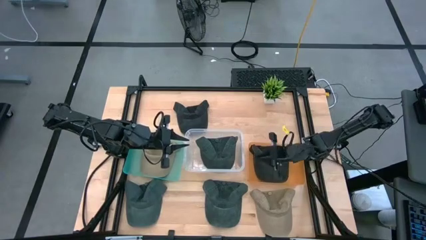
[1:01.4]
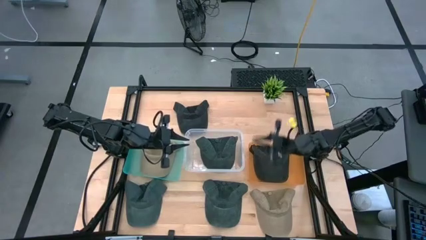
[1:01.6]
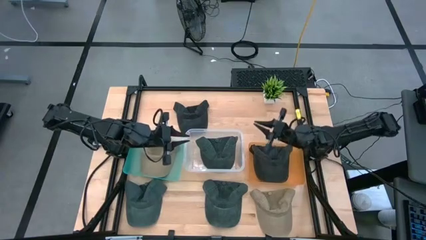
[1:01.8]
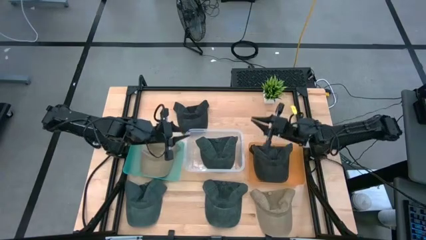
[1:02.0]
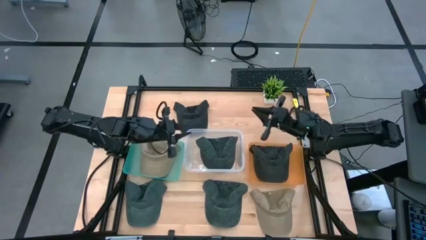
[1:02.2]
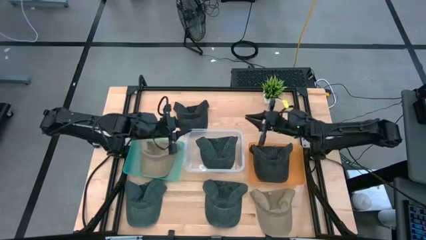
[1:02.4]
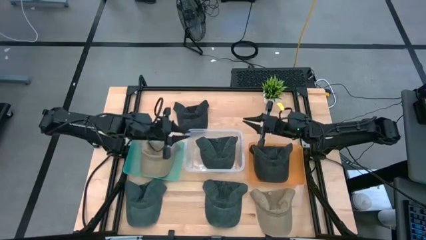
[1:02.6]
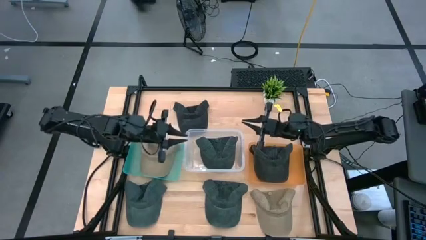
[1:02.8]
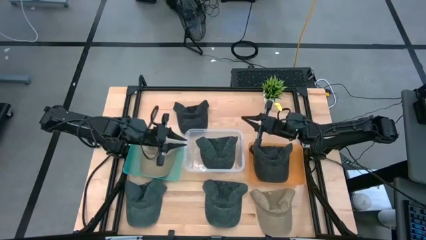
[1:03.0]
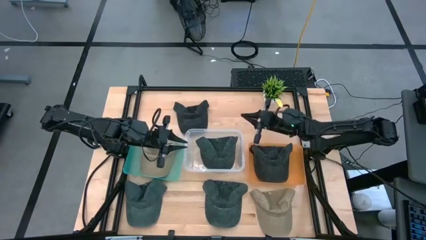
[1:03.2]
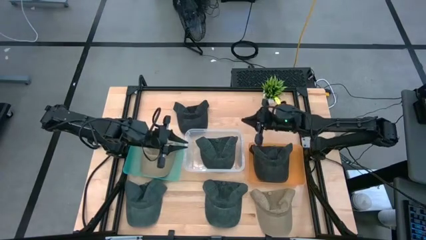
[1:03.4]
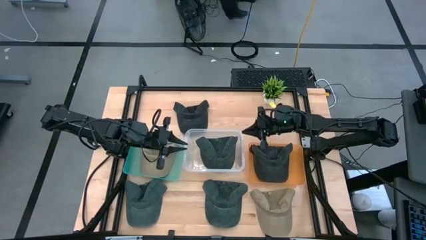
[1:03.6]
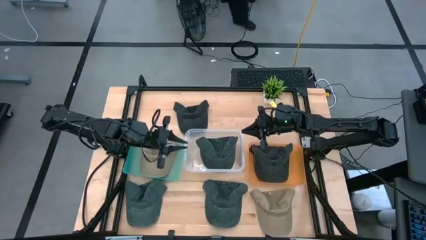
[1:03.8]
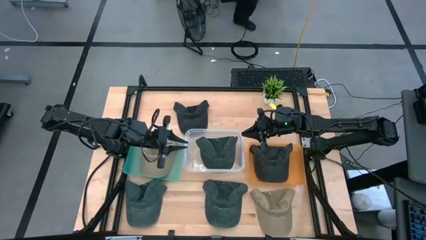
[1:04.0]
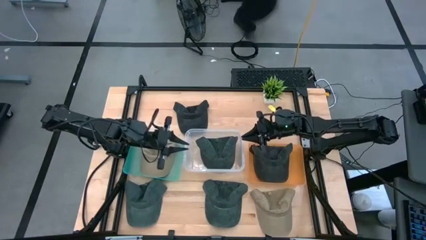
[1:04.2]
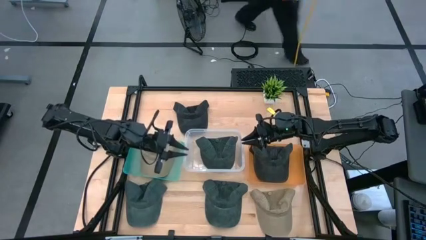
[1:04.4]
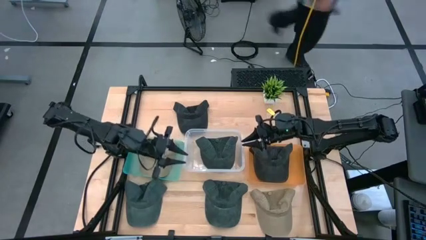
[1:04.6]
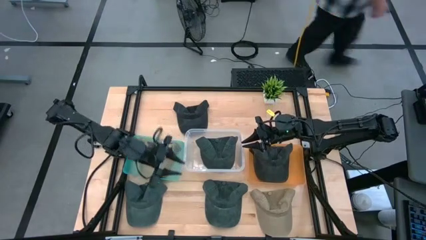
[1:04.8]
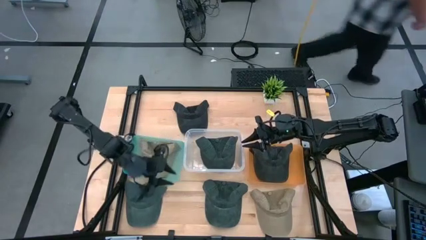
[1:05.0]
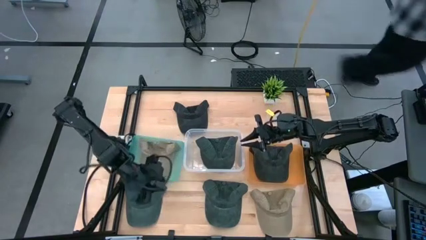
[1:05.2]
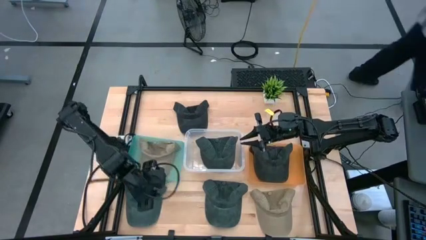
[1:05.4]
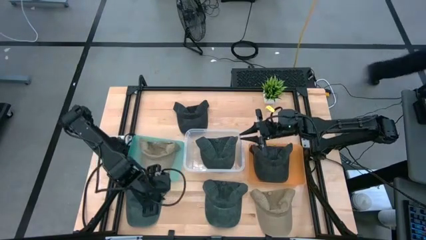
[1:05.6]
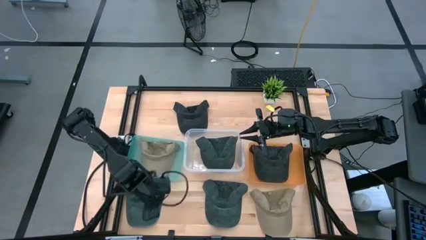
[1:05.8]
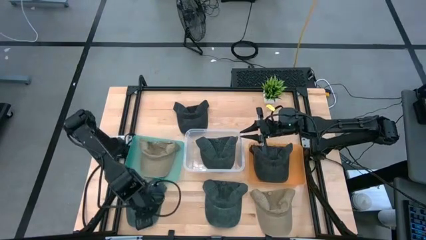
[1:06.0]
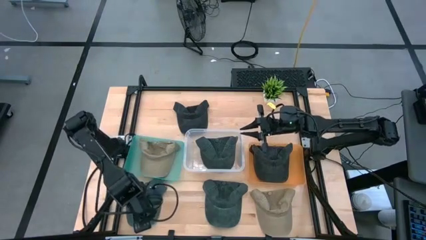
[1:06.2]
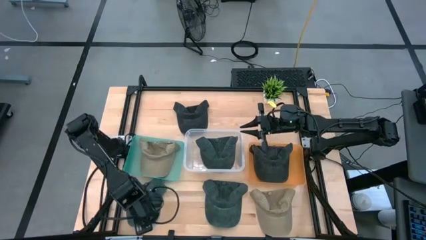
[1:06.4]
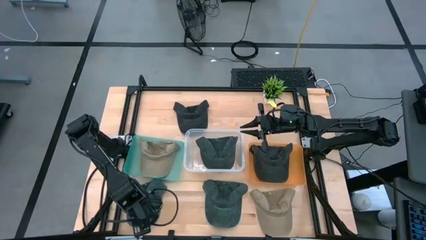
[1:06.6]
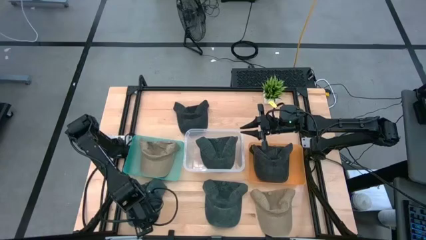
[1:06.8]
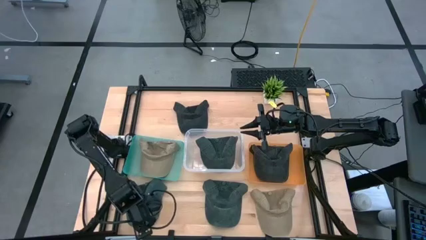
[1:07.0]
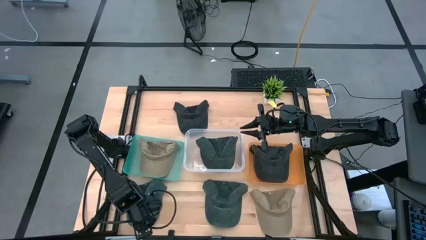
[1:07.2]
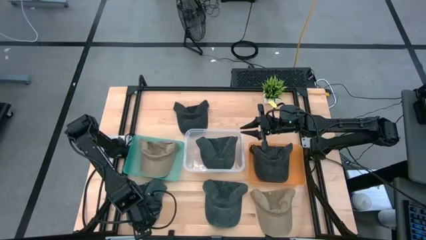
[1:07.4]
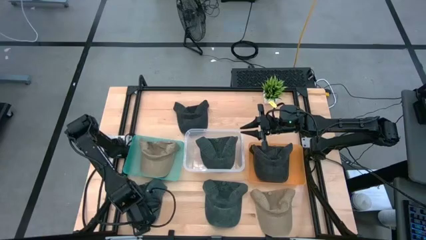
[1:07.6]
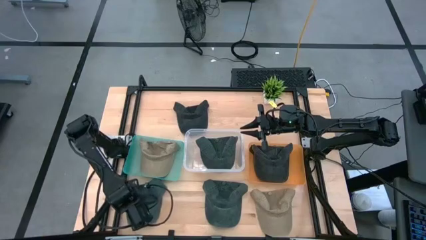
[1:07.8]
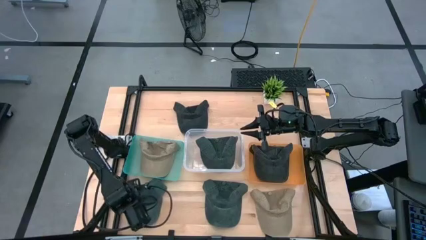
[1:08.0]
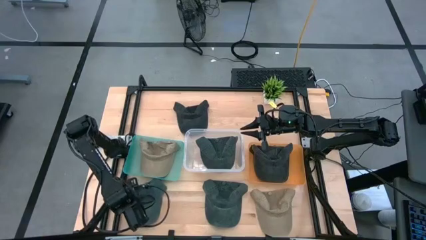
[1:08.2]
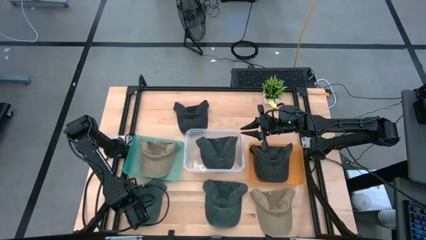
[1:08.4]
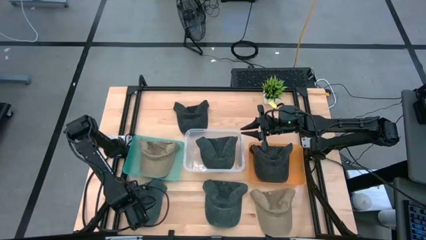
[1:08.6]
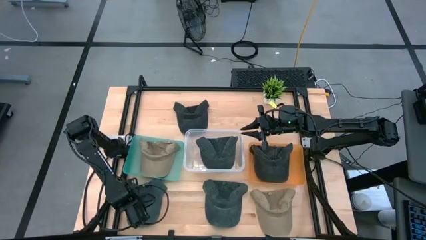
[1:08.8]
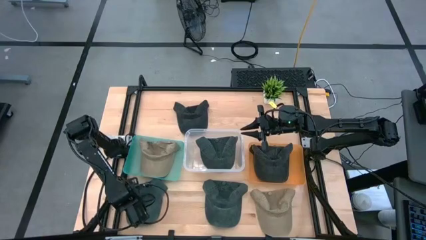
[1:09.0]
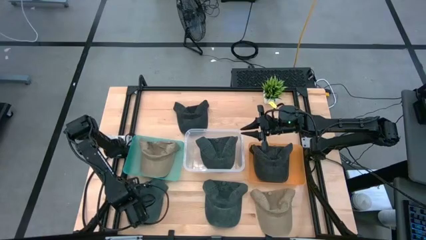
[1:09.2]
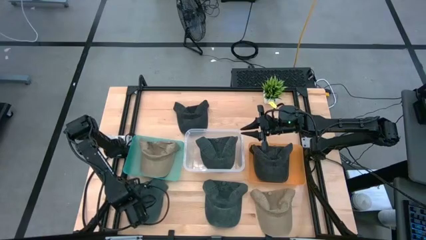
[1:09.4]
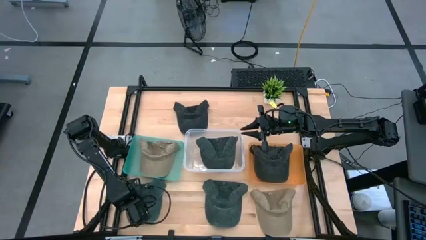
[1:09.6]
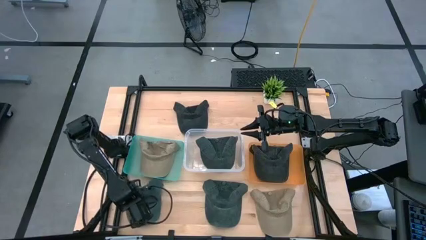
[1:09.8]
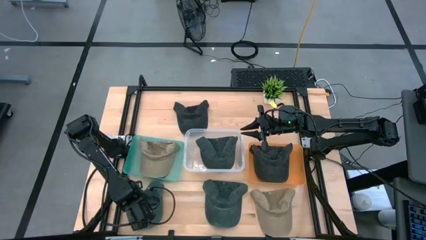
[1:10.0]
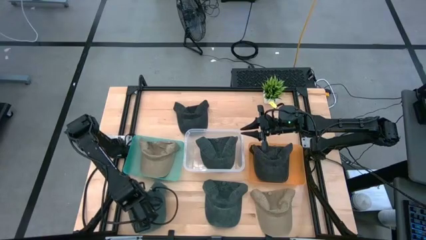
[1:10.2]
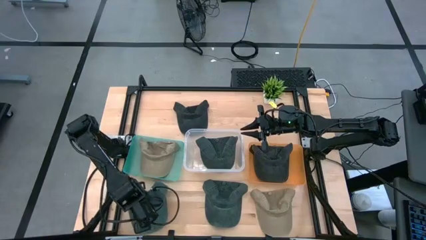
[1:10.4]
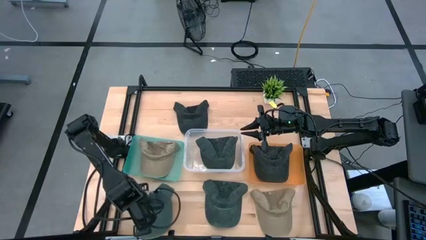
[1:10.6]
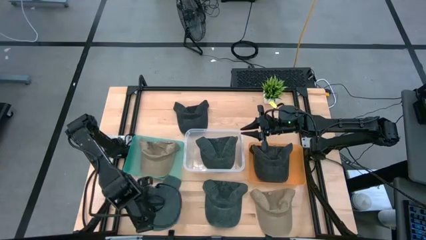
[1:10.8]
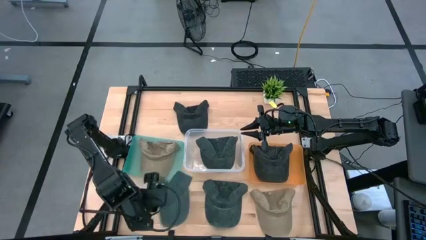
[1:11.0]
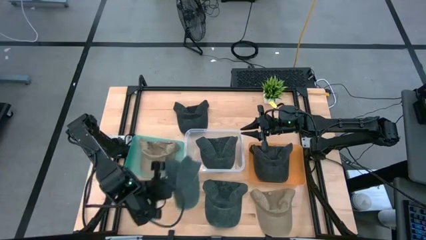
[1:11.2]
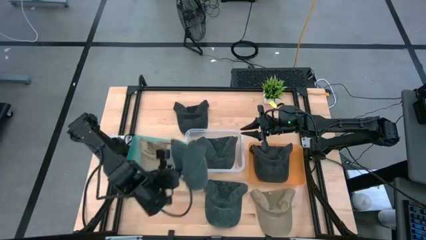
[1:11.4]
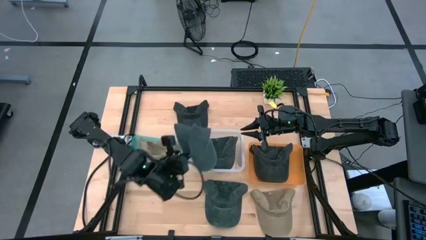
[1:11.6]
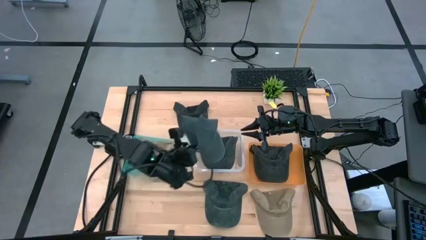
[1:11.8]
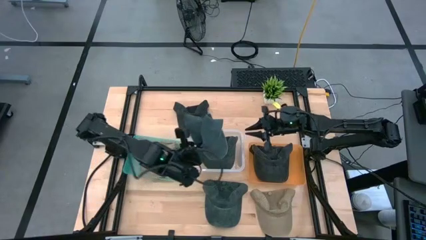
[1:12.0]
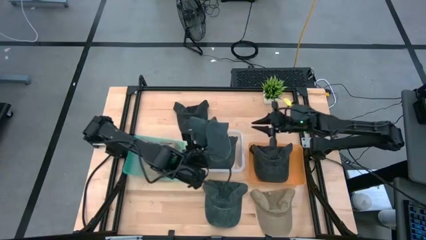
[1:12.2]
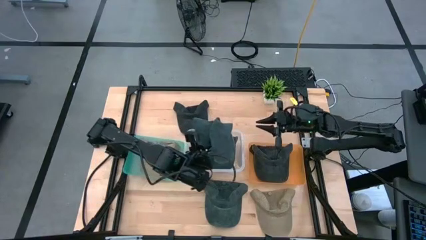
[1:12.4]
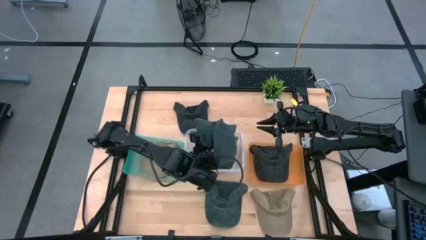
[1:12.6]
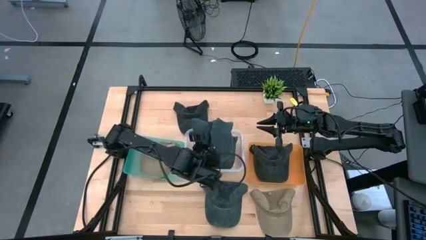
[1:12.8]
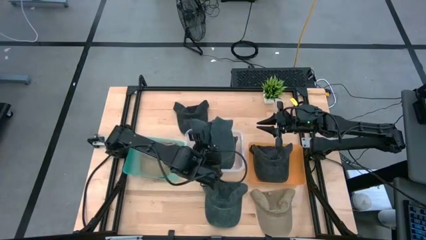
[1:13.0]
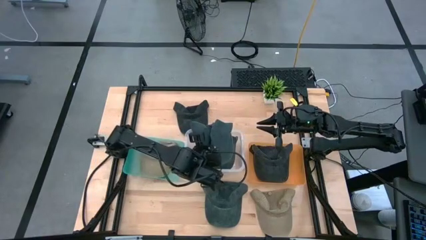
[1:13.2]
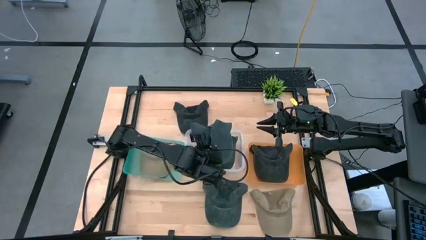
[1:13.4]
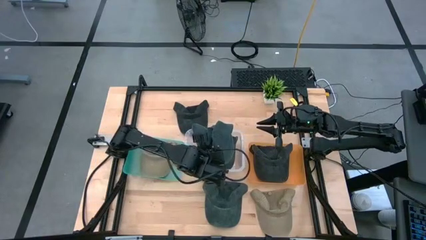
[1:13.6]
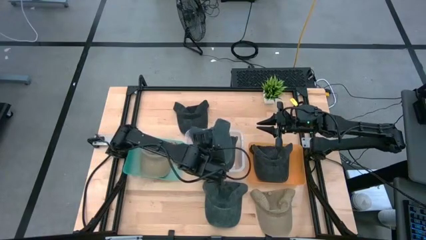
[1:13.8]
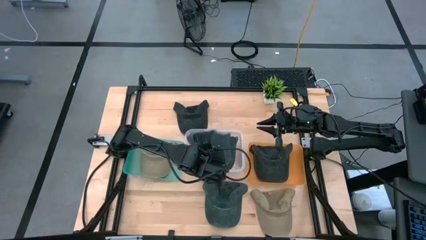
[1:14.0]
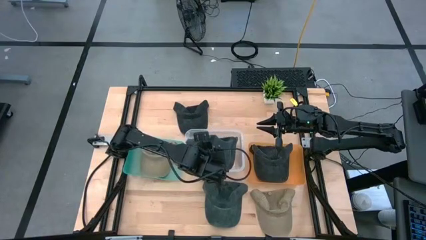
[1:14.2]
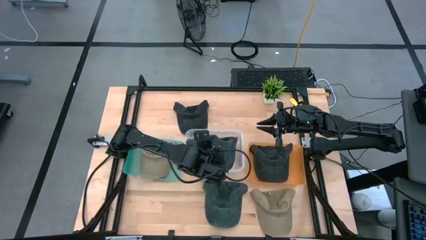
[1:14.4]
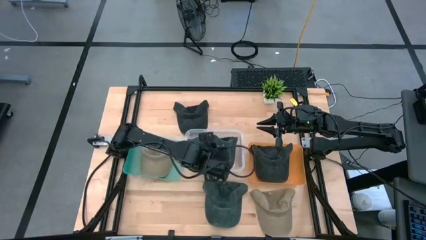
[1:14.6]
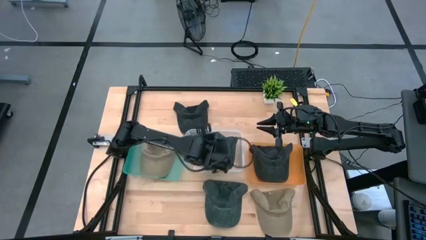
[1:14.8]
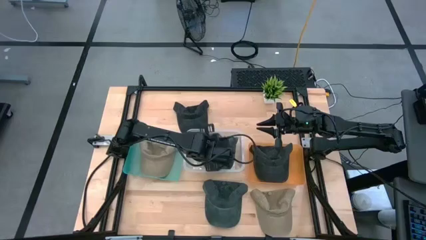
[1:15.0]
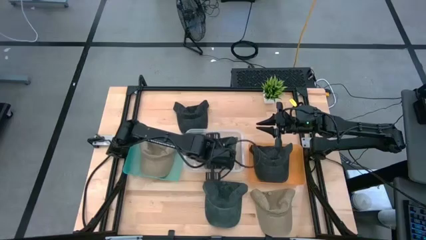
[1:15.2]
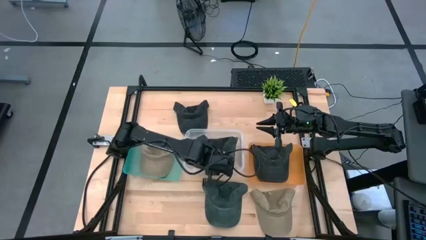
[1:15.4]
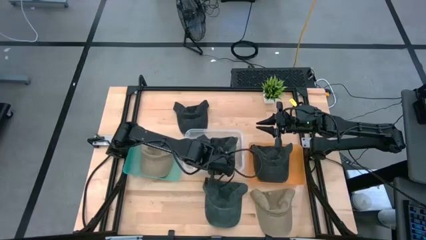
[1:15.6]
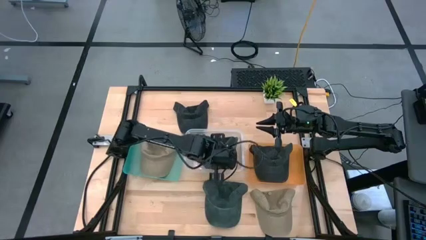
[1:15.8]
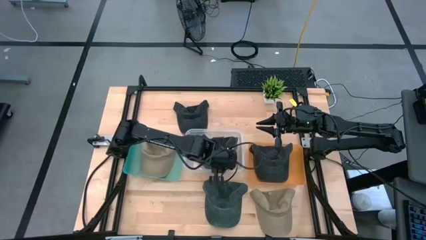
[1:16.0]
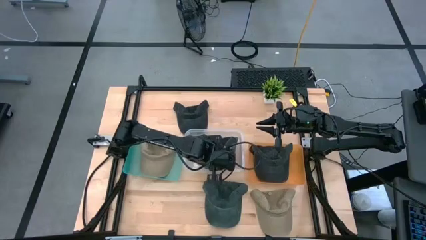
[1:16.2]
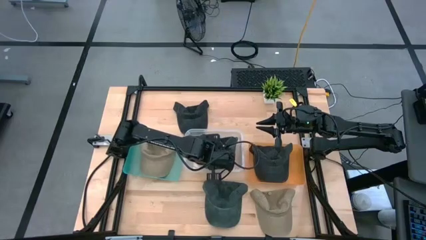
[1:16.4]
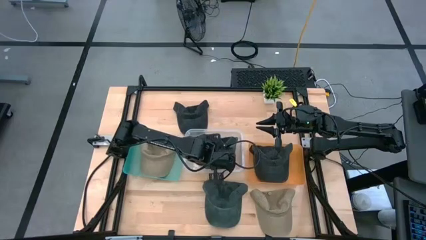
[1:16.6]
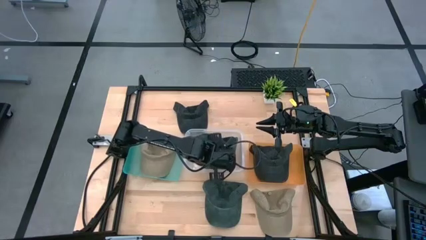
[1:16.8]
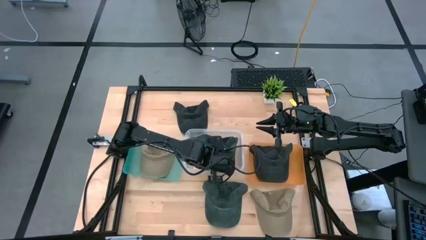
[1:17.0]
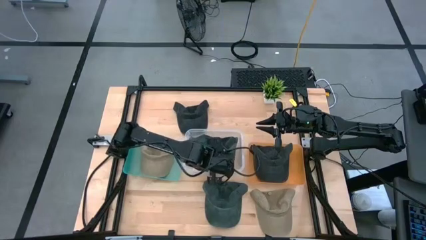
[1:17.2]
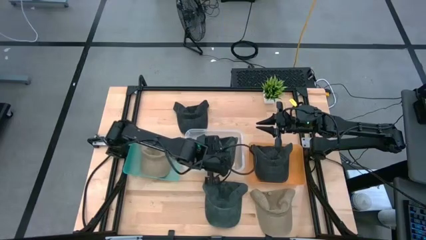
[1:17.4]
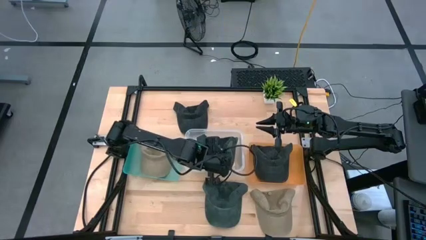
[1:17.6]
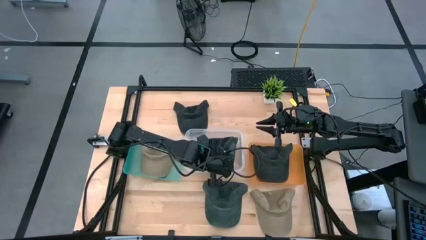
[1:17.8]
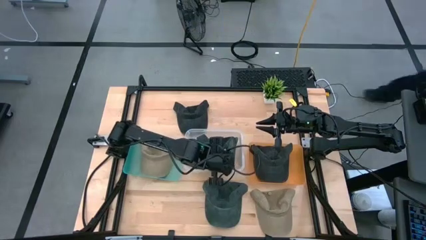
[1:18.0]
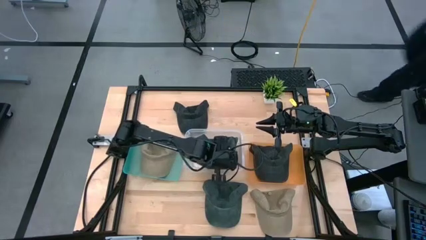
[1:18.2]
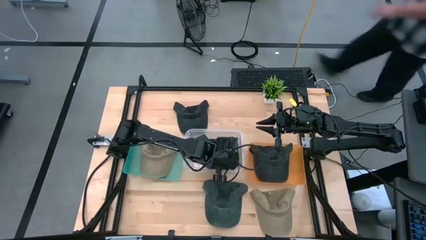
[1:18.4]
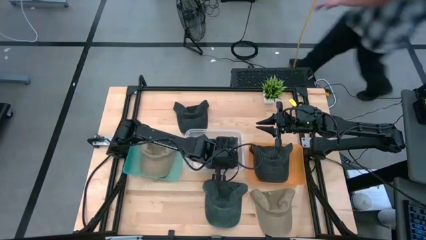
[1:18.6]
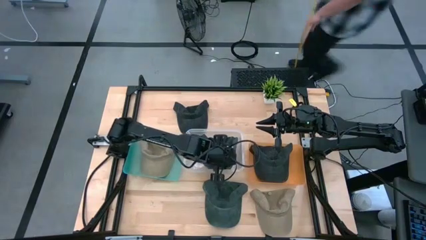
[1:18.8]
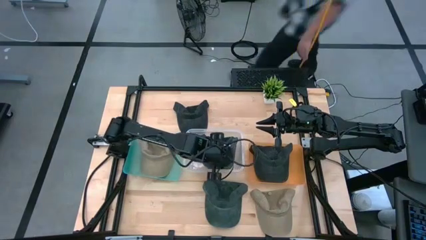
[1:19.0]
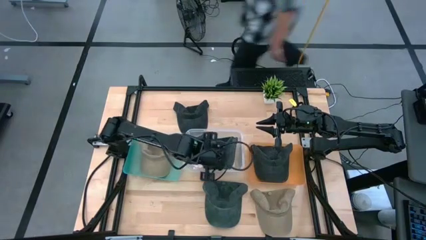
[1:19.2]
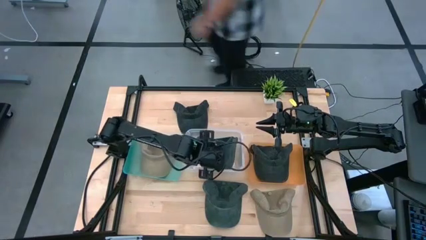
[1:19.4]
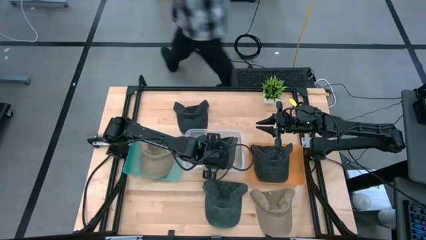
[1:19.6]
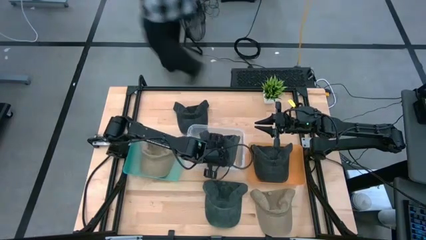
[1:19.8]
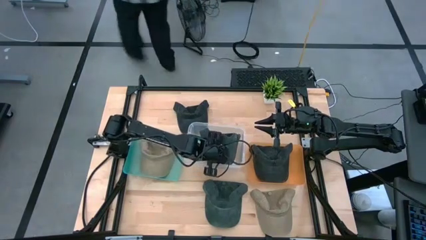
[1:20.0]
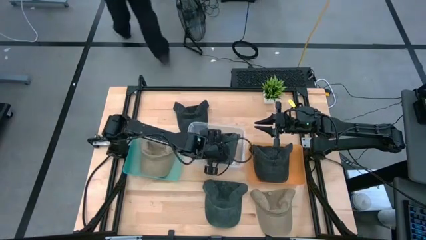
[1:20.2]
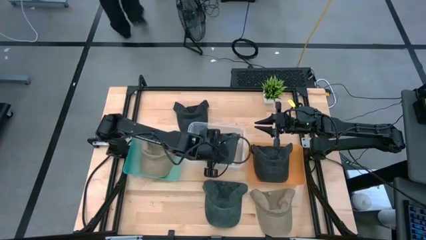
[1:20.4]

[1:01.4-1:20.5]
Task: Pick & Place hat
Put the left gray cap into the transparent bin
